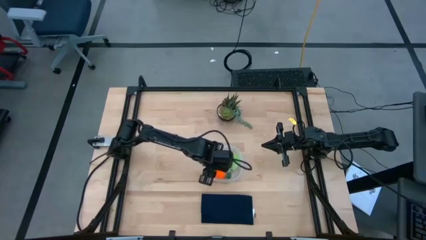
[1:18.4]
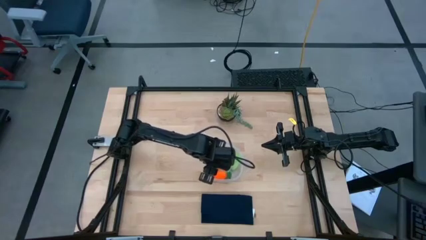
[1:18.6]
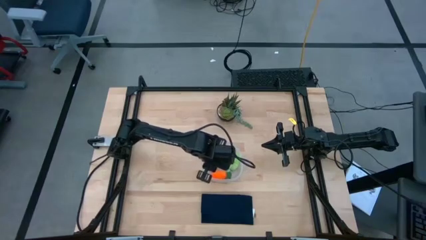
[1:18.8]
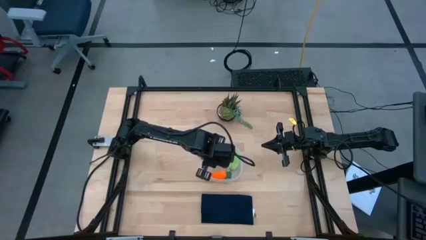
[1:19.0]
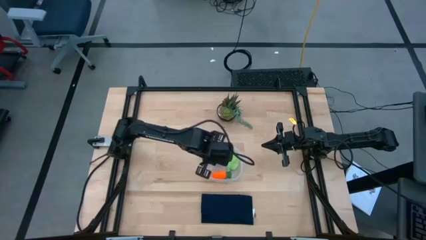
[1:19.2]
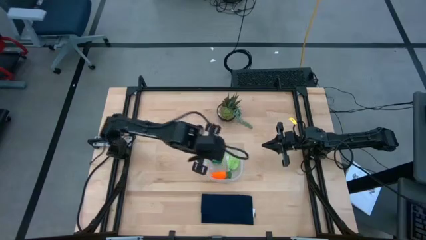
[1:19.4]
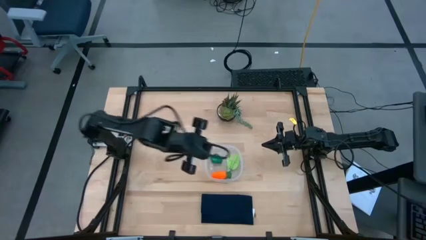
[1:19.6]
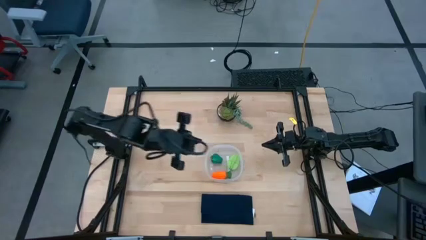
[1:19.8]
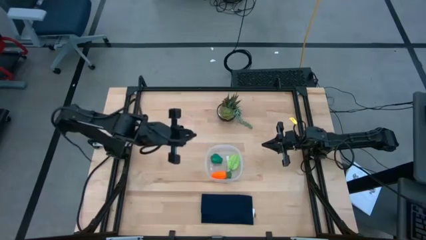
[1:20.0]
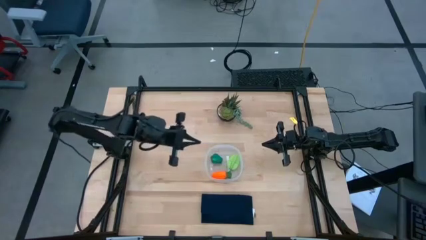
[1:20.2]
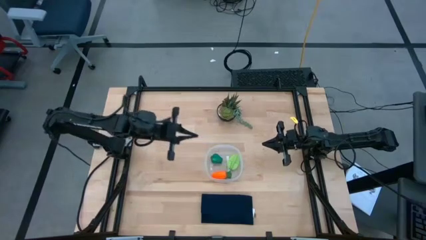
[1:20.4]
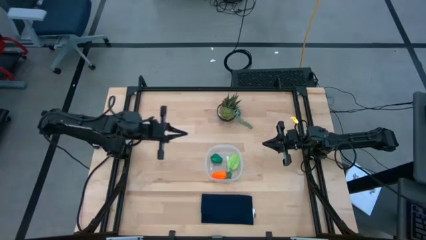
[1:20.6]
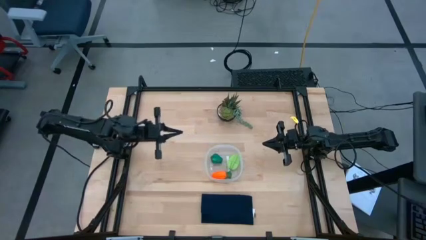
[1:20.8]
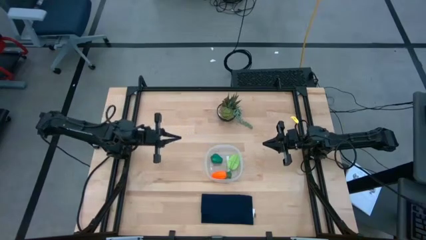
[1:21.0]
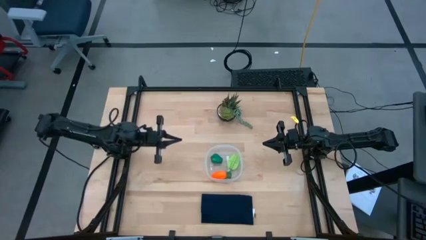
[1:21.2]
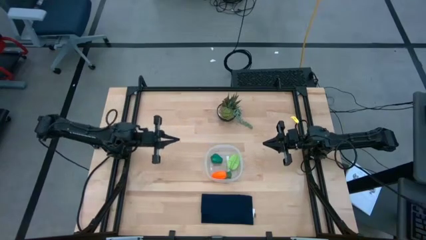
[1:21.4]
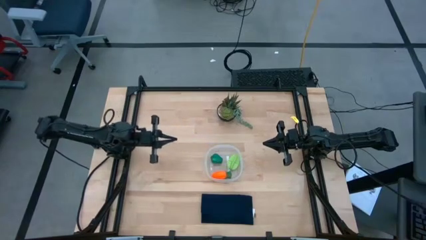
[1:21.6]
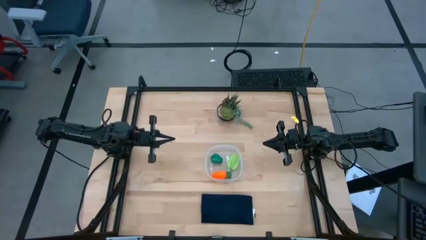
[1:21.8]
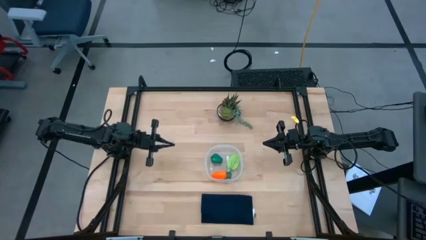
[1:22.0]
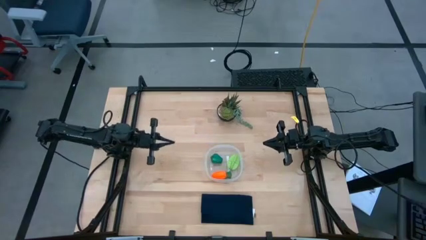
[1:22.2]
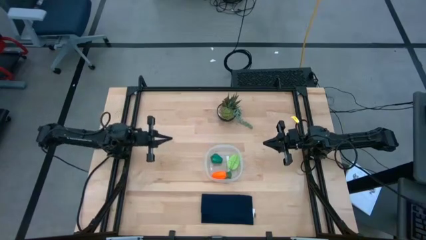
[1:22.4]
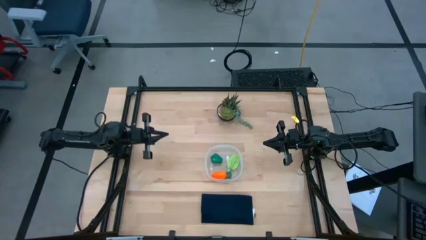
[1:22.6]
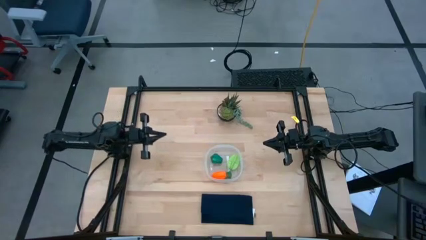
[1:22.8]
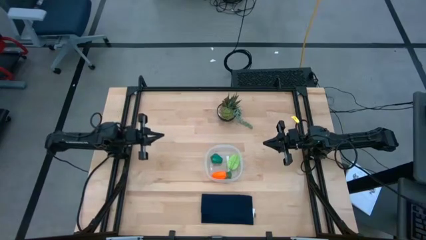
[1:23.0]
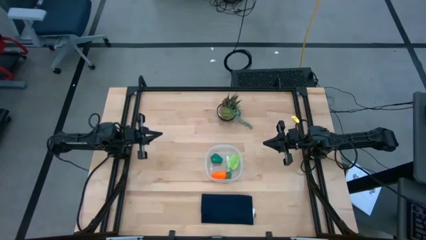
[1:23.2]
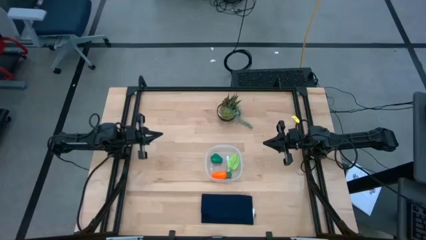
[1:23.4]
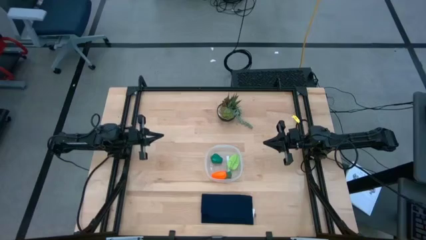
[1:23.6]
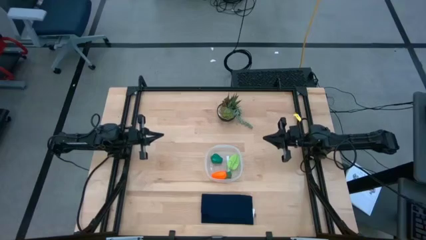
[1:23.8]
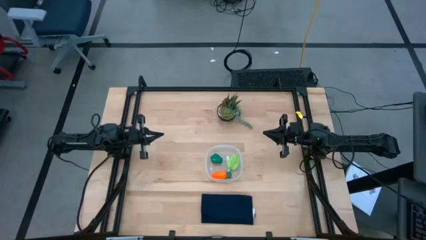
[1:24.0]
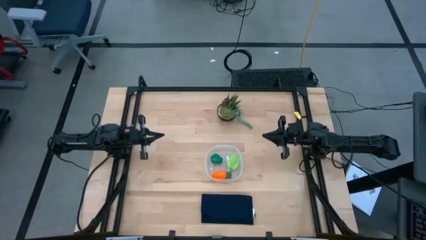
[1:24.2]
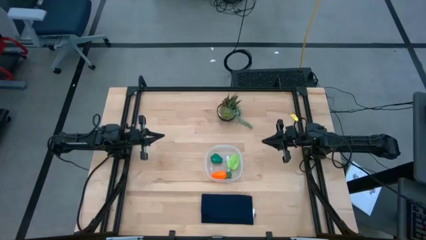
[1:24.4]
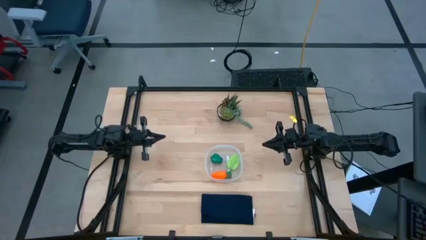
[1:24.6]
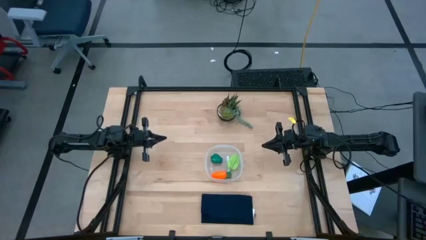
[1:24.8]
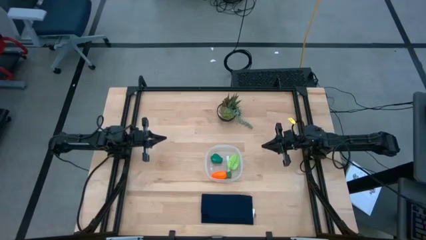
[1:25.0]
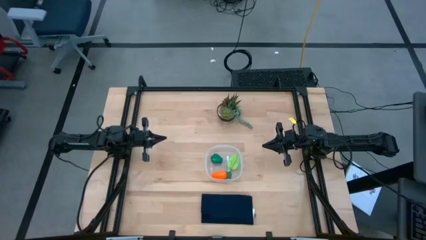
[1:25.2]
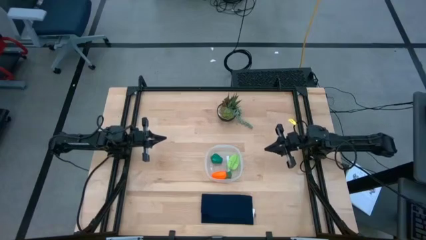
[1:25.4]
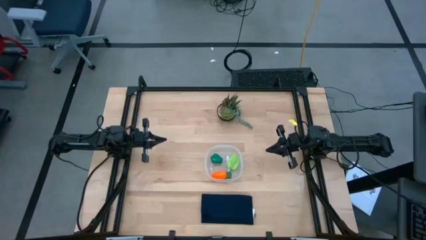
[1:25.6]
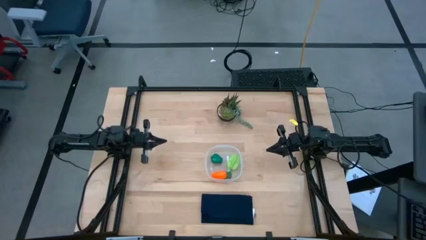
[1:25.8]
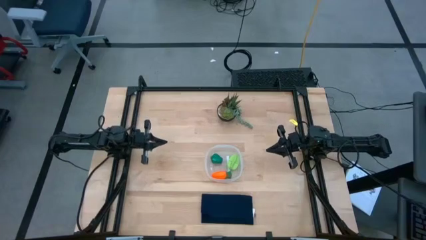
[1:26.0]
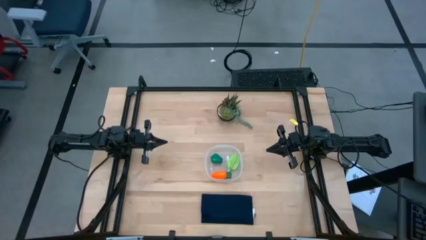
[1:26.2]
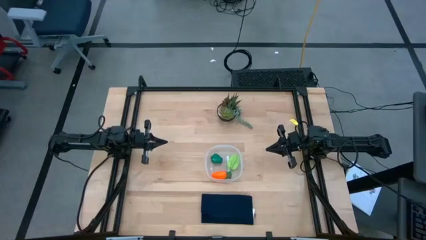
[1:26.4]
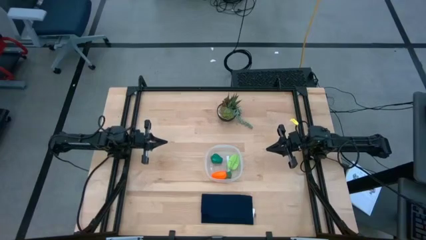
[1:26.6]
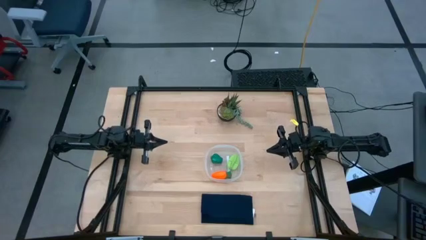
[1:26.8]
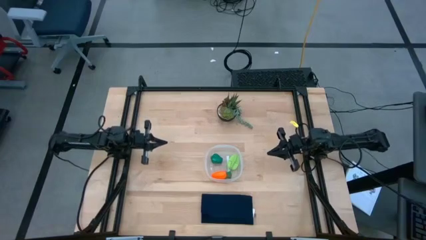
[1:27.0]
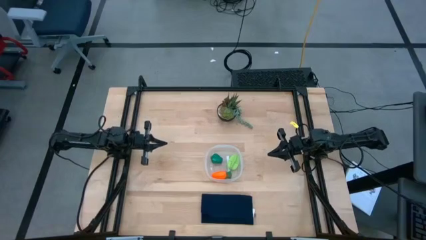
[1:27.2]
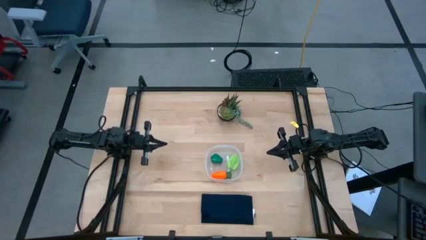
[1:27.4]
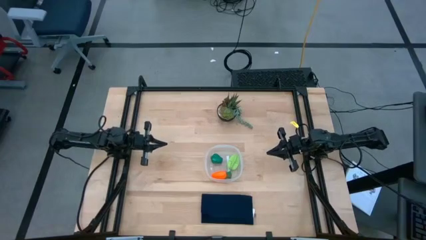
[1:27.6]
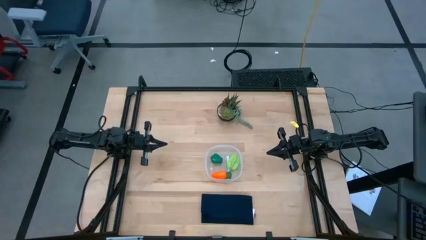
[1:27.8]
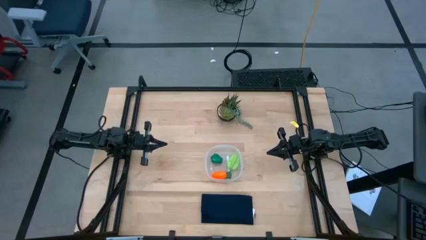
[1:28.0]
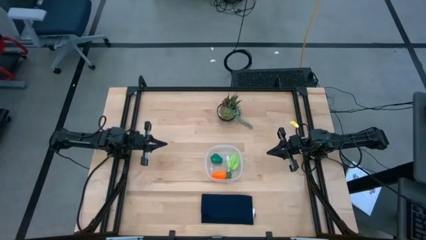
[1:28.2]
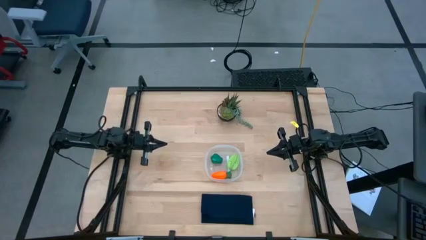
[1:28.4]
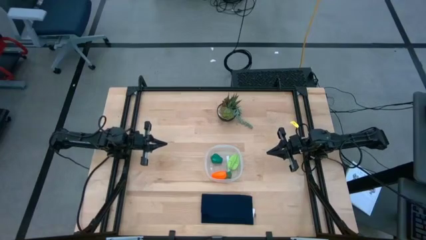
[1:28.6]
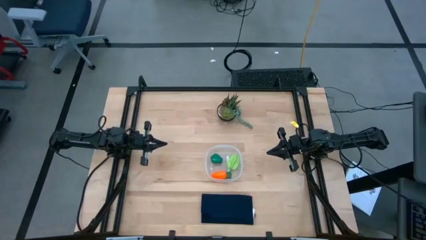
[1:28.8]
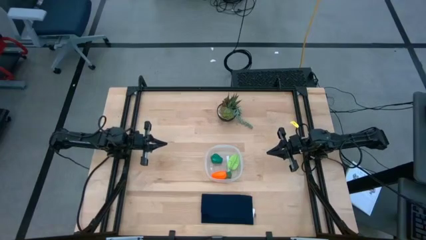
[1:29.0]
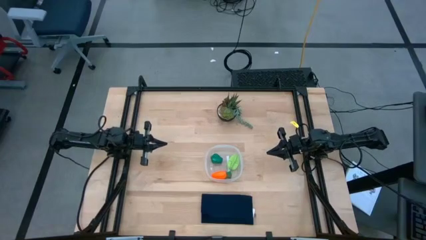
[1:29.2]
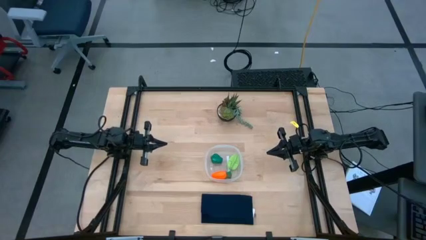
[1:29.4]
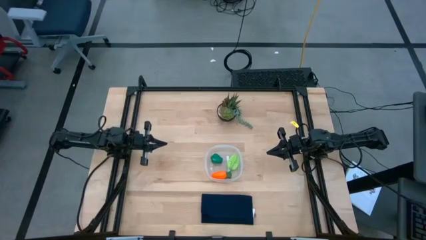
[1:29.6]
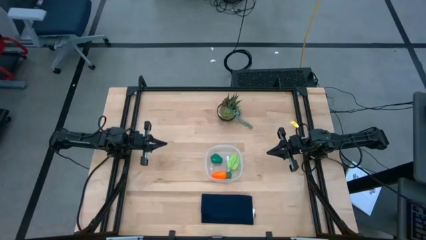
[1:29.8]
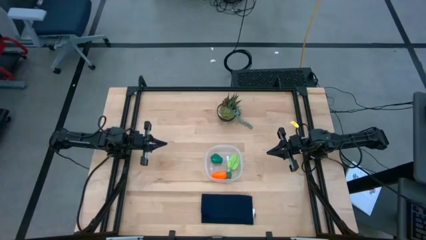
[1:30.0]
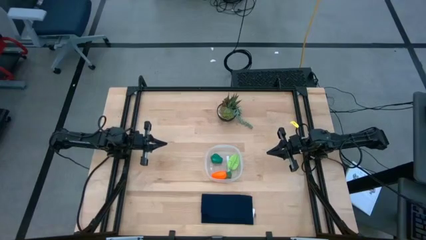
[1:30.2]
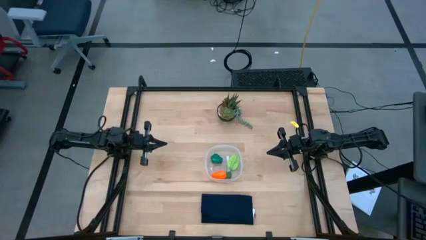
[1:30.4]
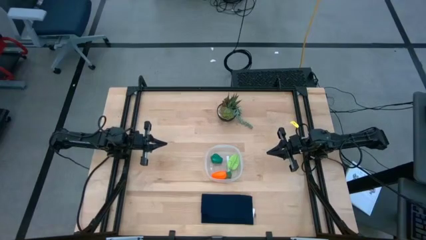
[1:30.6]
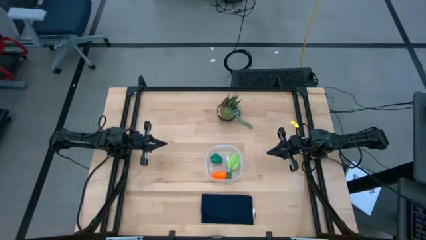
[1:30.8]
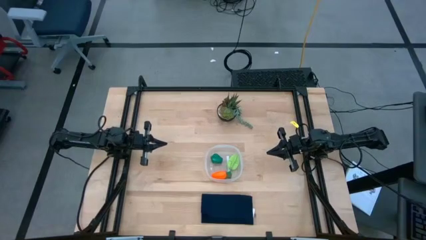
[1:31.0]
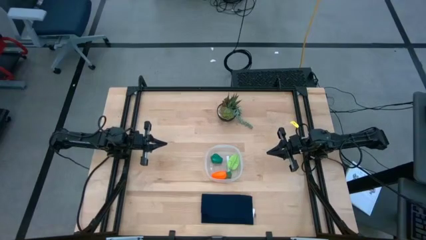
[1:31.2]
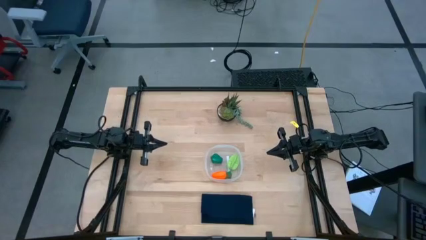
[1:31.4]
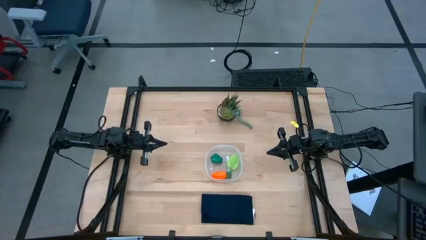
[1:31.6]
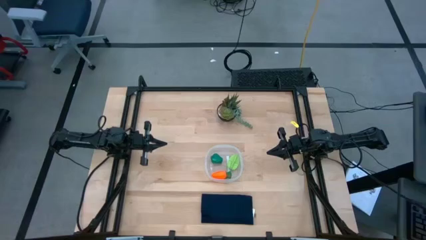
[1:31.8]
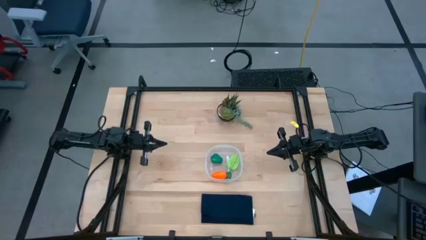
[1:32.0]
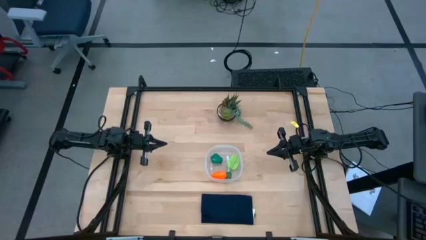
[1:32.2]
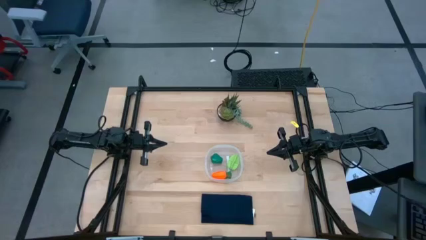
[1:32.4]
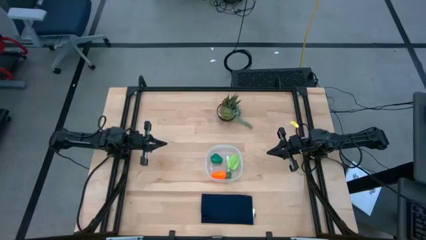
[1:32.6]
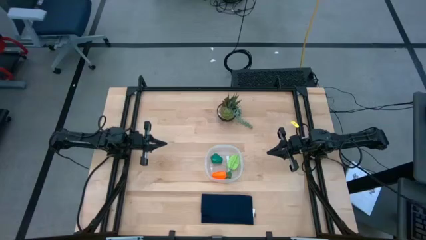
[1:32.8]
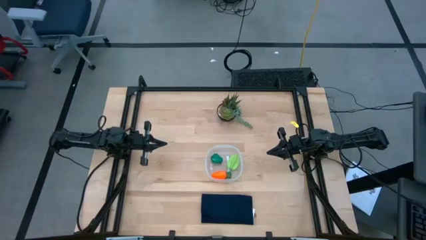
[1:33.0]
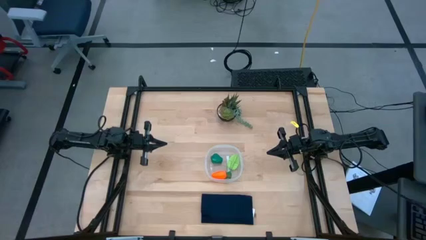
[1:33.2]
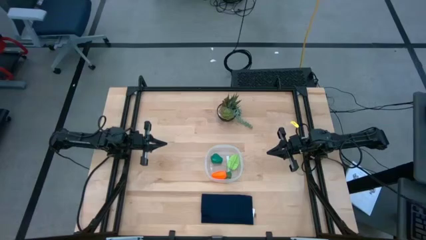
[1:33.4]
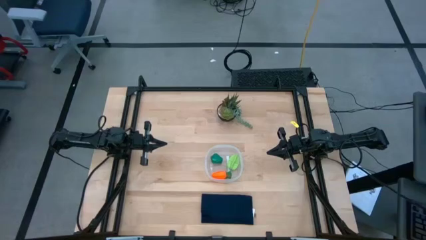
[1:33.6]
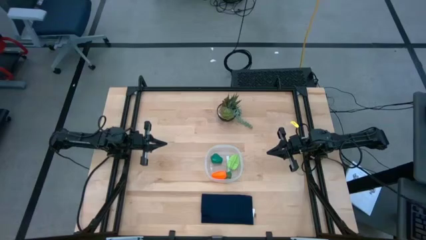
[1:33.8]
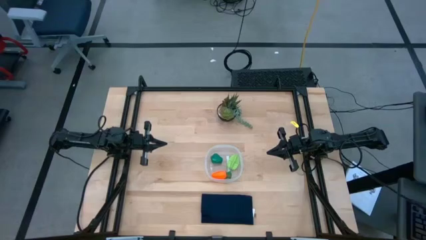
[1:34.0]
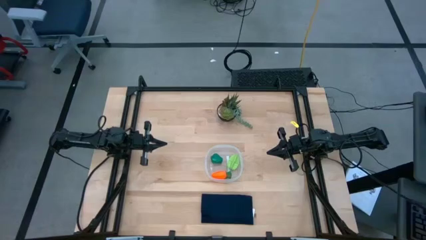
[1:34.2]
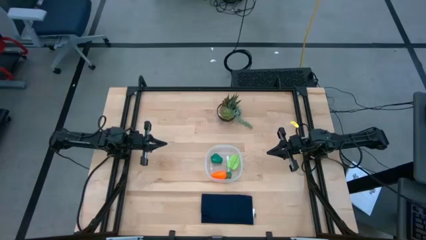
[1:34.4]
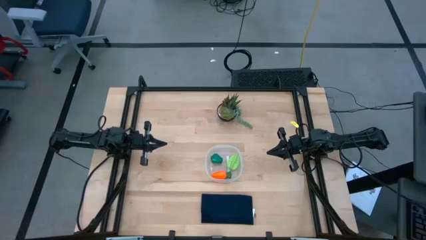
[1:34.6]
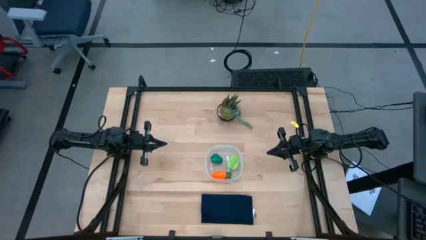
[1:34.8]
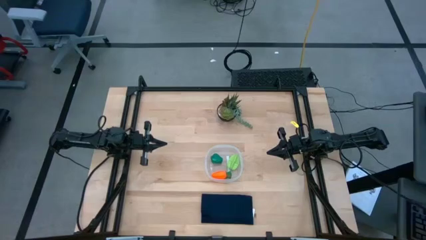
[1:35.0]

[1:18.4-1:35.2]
Task: Pick and placing Produce into tupperware
Return to Home Position
